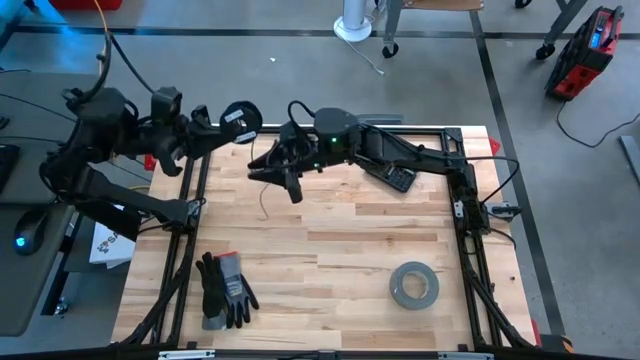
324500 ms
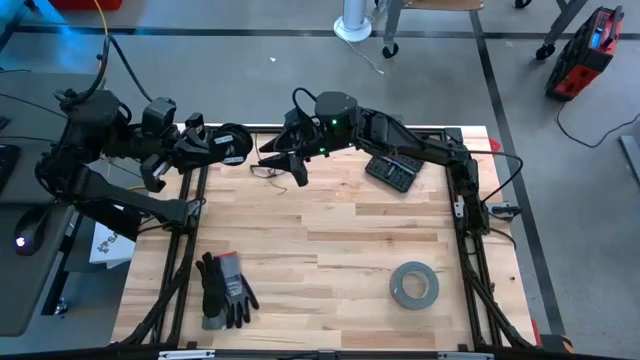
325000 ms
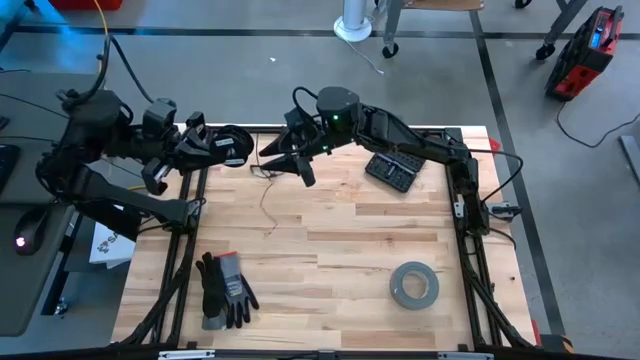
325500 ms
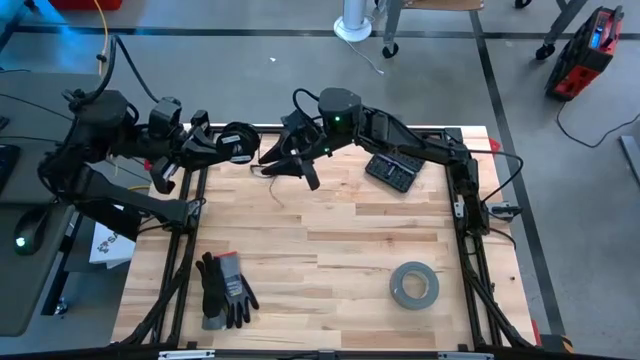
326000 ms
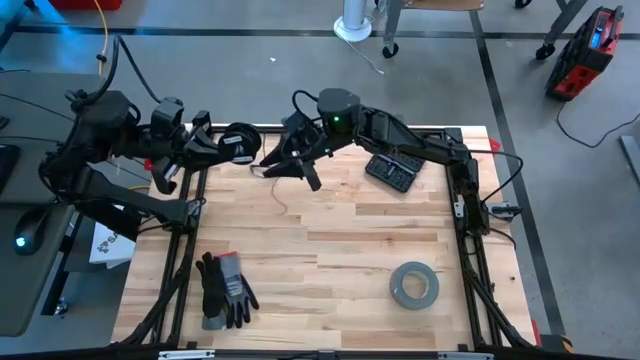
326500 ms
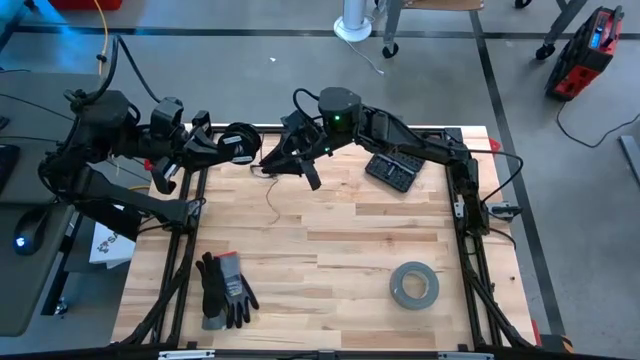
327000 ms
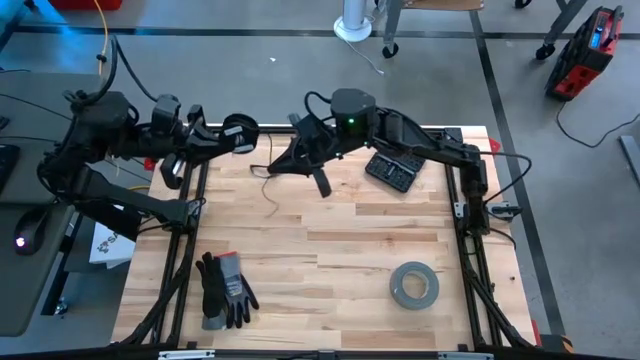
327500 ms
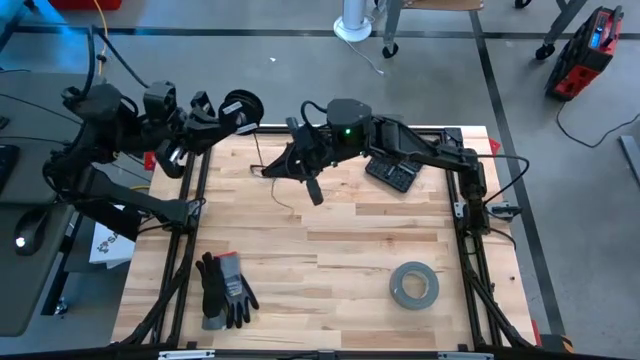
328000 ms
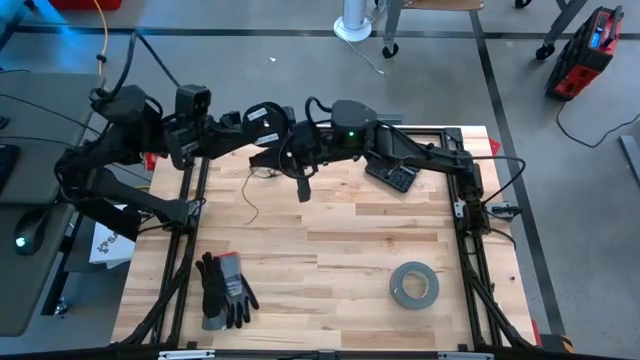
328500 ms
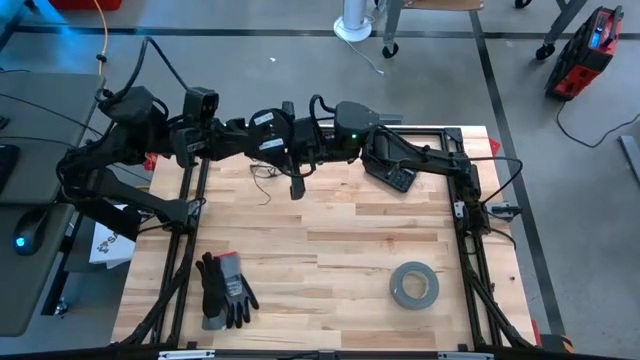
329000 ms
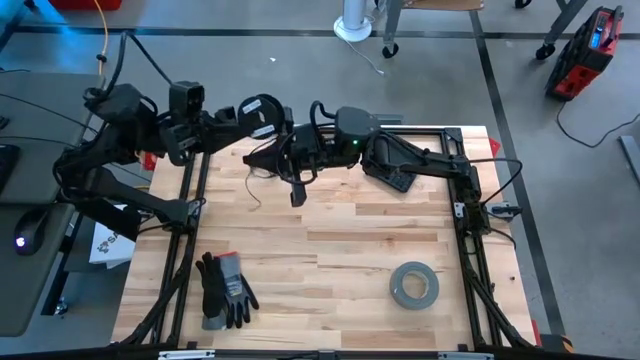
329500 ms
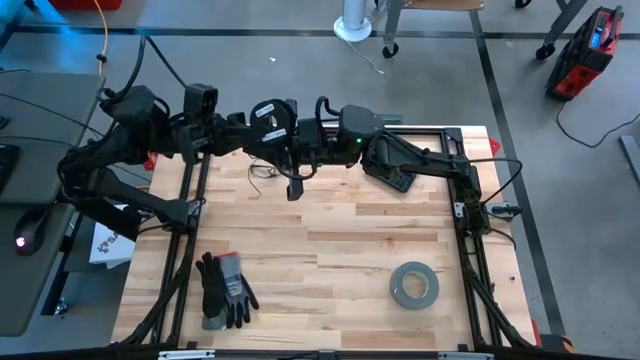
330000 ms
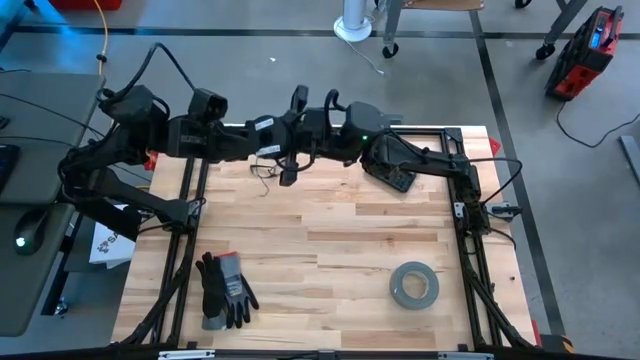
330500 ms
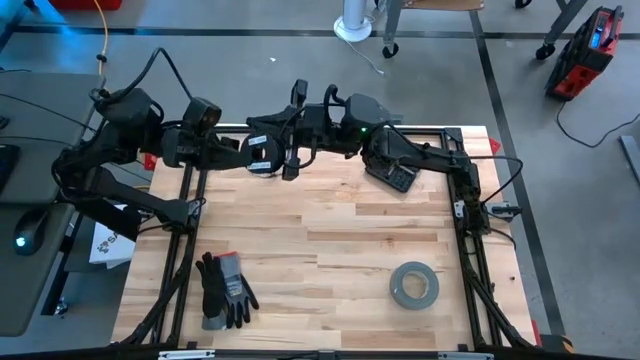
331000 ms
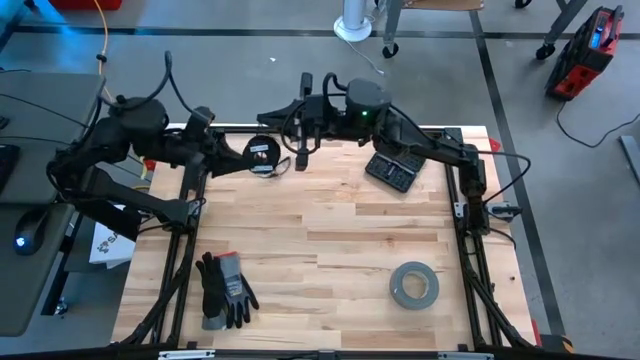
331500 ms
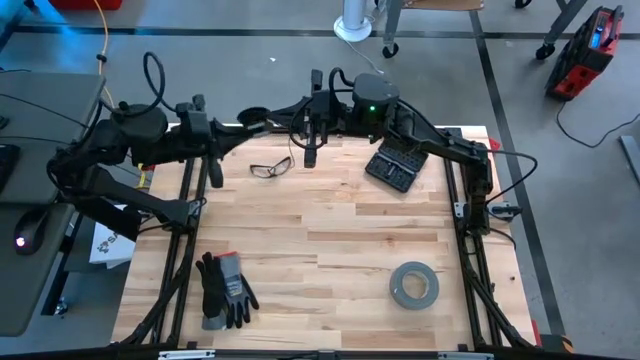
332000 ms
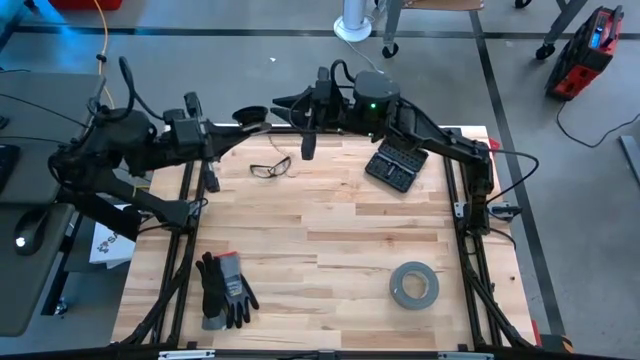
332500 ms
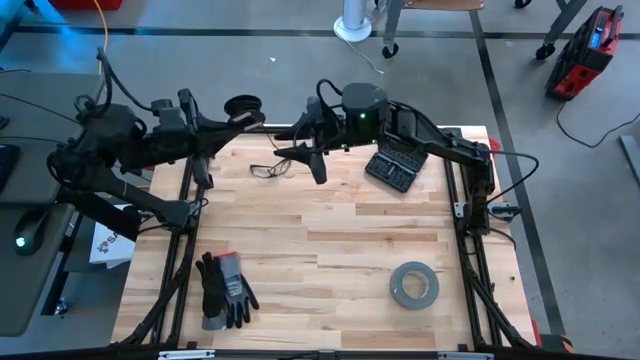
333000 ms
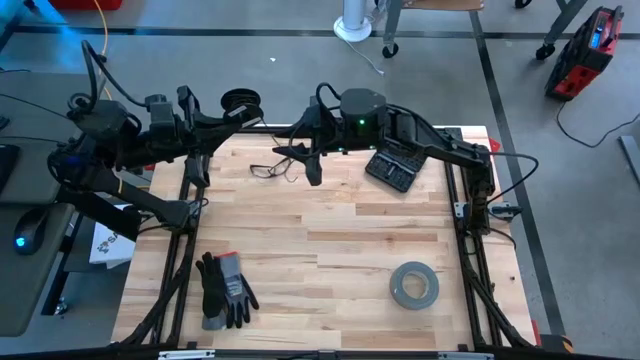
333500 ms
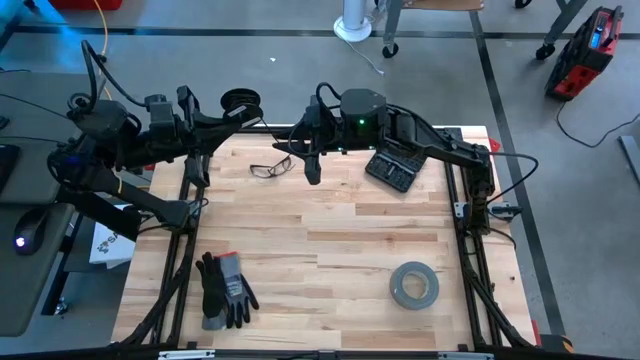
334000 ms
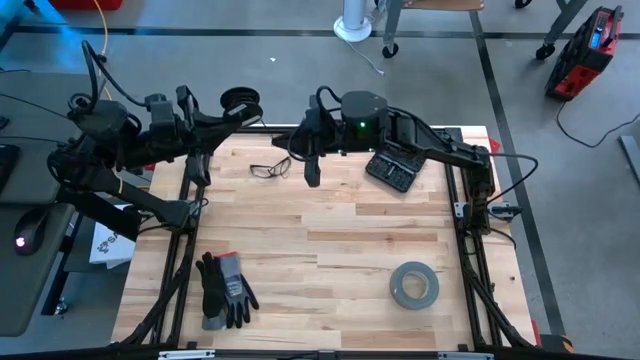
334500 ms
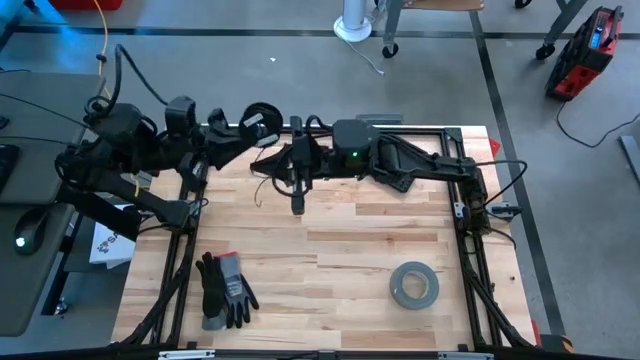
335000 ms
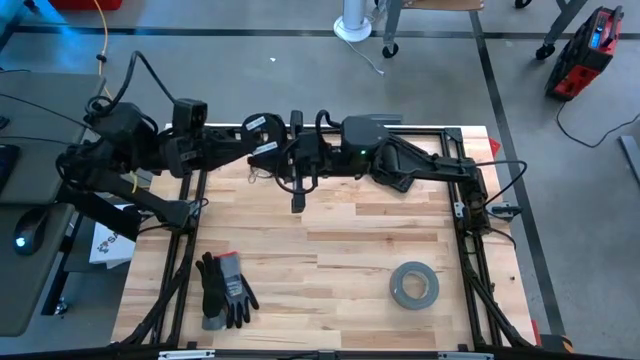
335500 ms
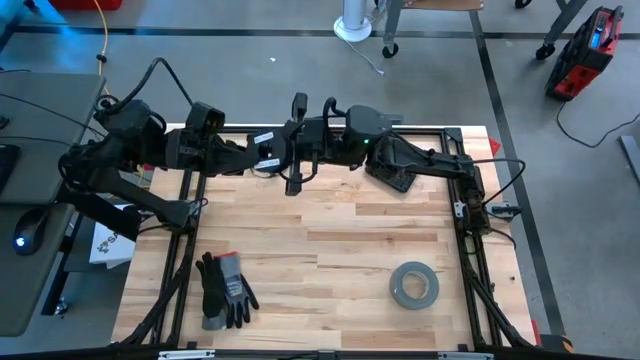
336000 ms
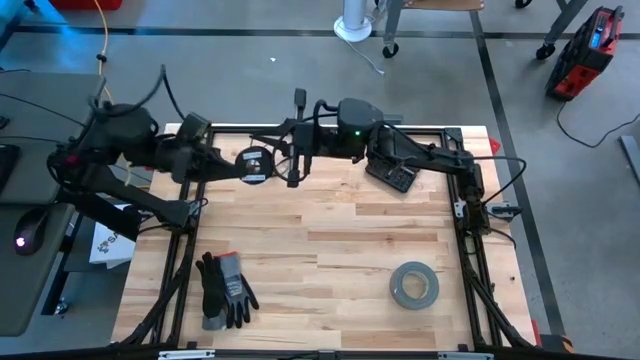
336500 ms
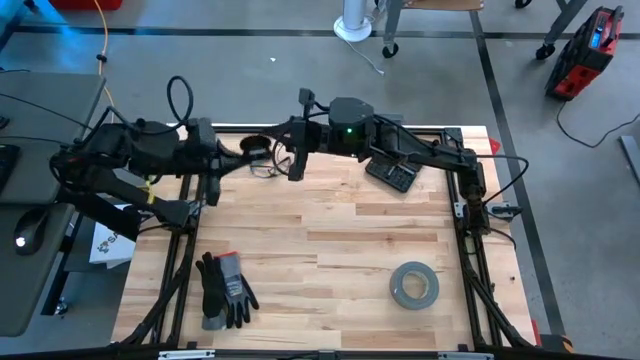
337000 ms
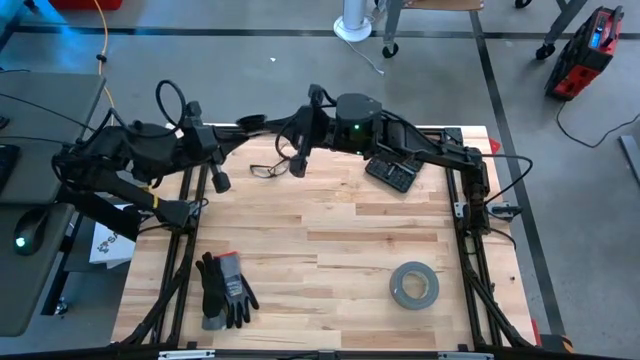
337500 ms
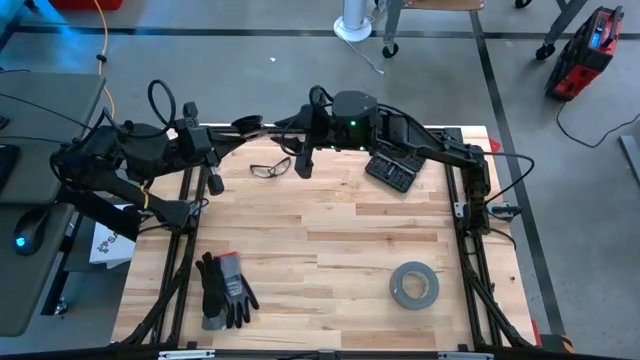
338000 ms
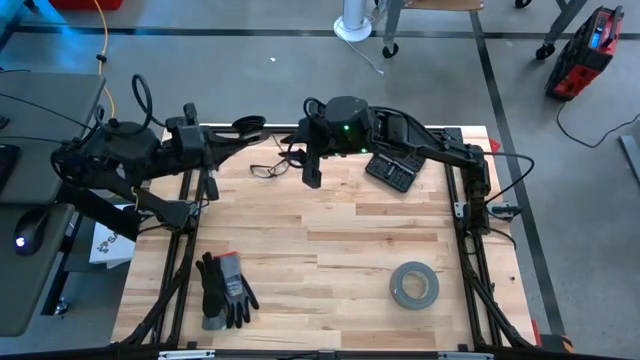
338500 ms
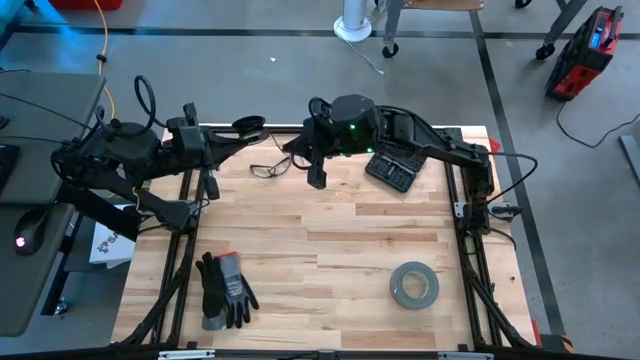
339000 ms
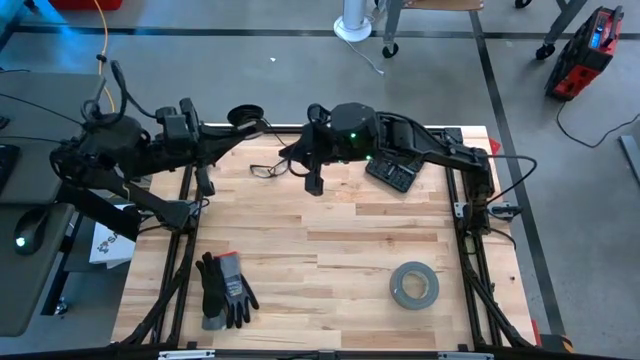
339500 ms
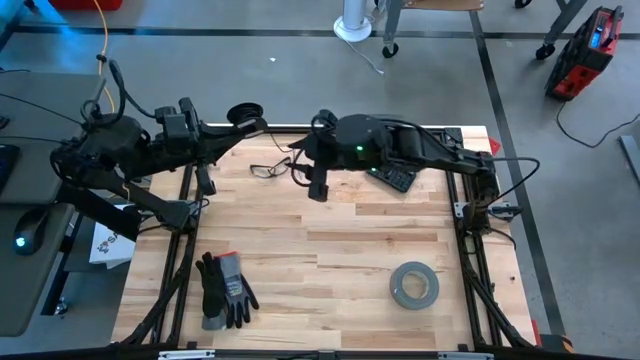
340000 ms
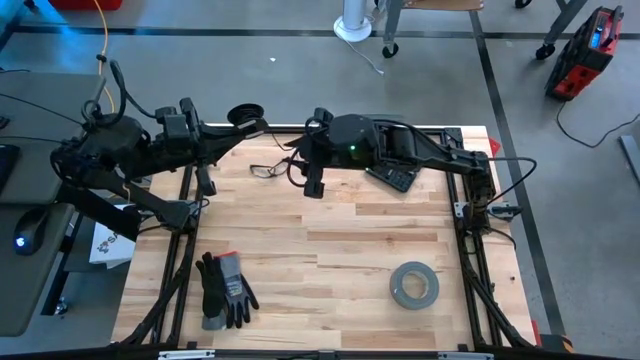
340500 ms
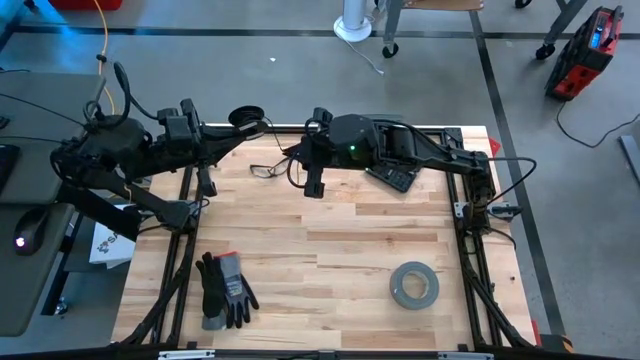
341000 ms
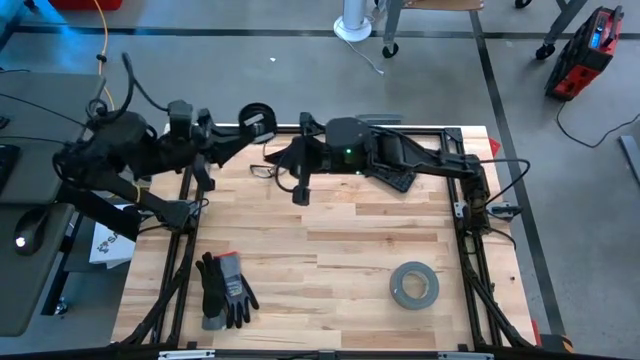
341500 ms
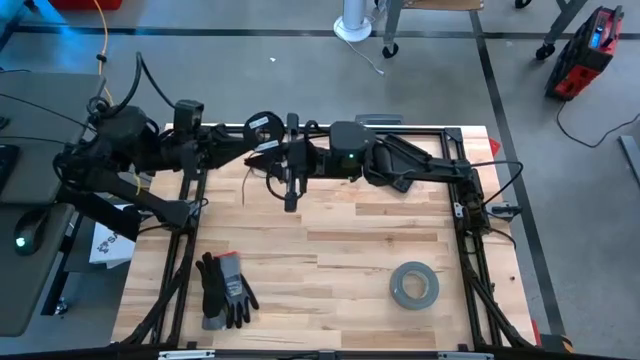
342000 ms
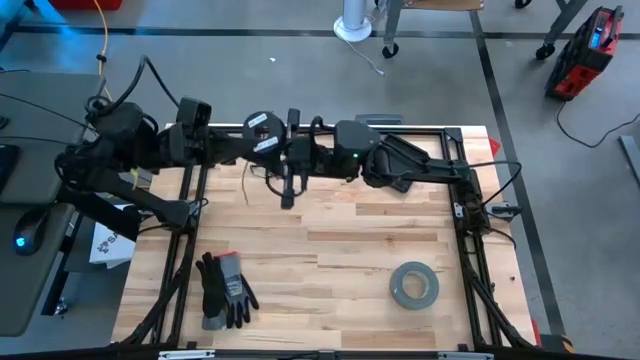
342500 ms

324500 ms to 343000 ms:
Task: Coil cords
Coil the black wire on the black spool
